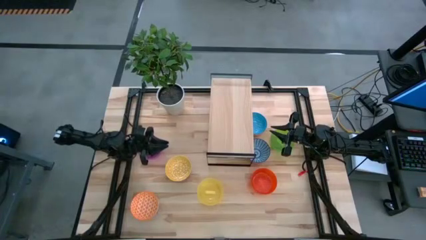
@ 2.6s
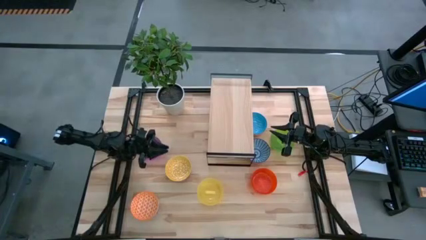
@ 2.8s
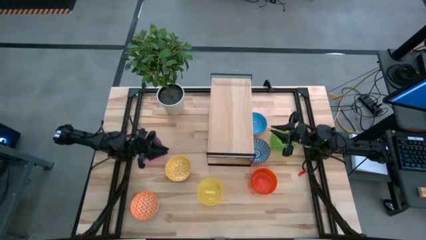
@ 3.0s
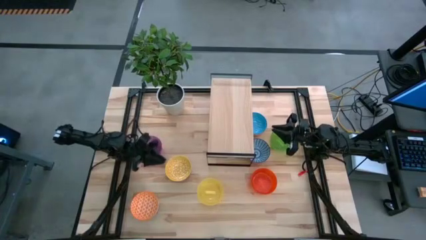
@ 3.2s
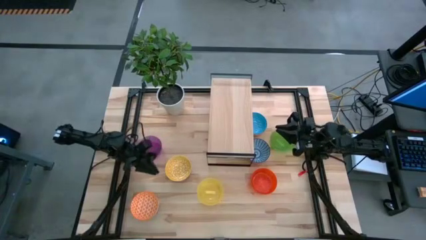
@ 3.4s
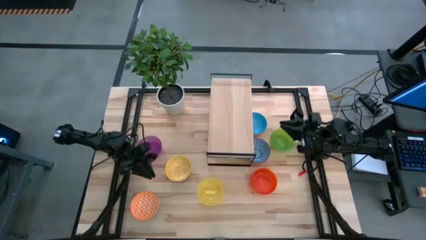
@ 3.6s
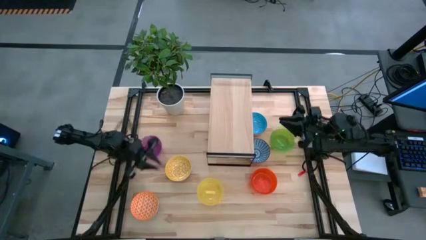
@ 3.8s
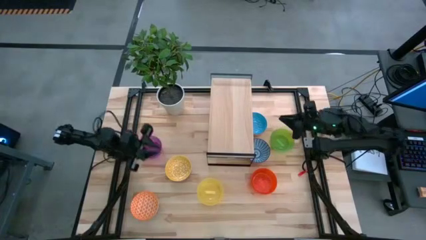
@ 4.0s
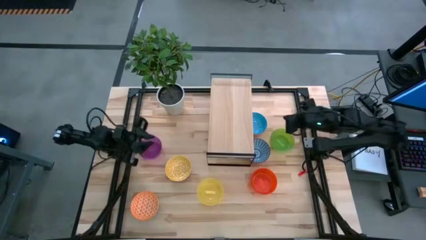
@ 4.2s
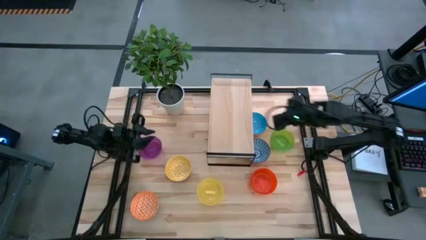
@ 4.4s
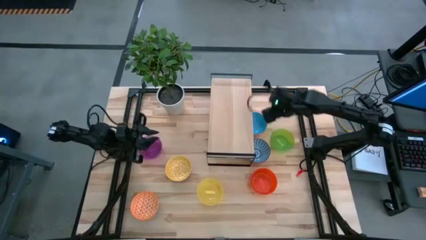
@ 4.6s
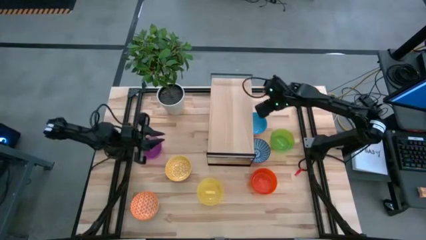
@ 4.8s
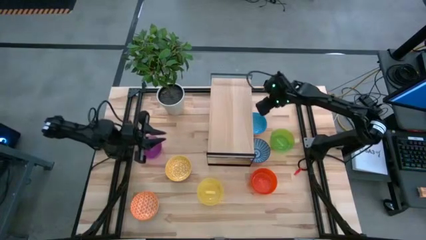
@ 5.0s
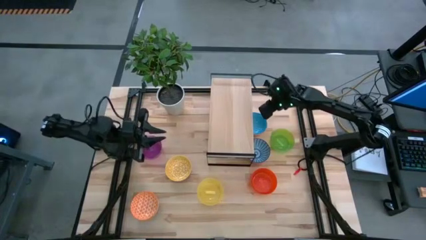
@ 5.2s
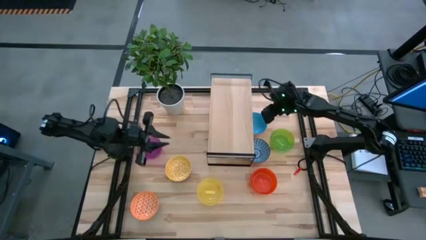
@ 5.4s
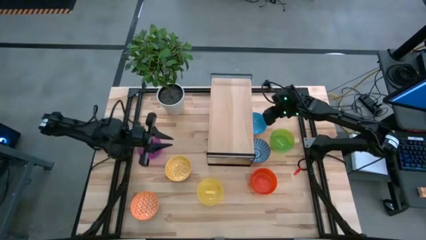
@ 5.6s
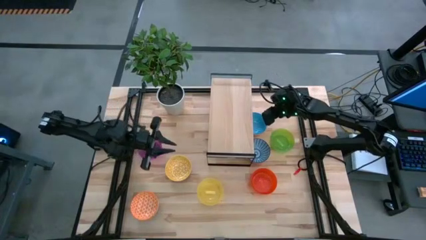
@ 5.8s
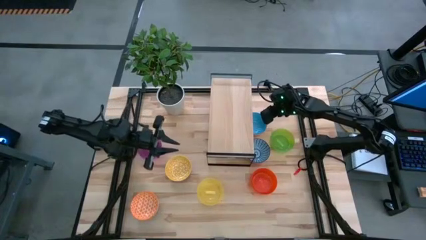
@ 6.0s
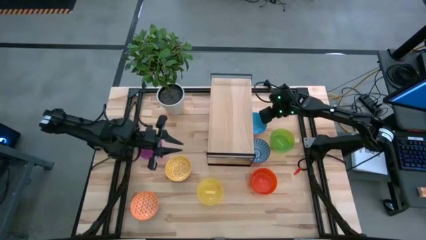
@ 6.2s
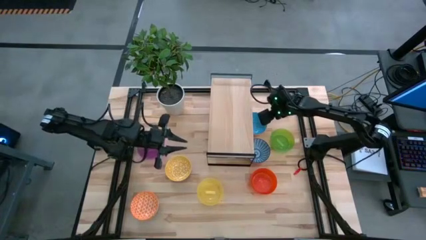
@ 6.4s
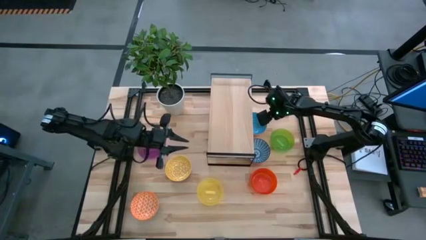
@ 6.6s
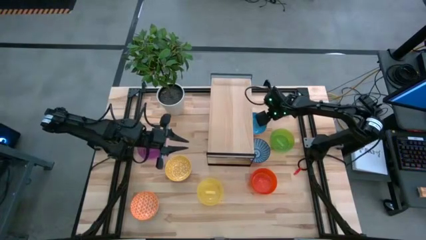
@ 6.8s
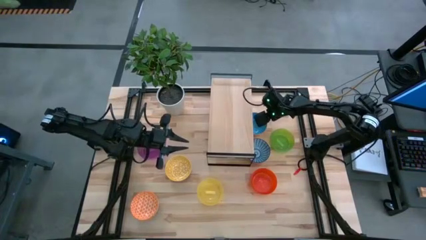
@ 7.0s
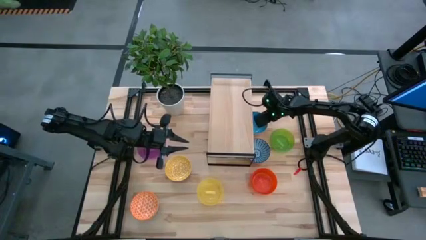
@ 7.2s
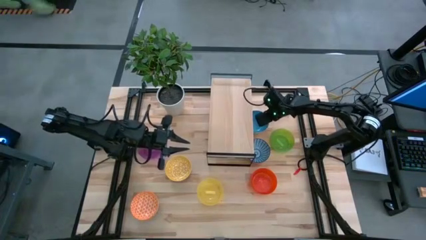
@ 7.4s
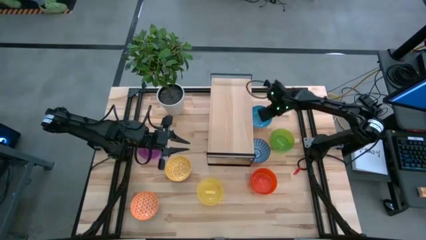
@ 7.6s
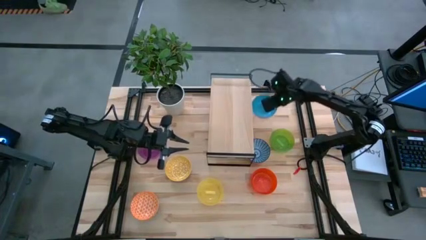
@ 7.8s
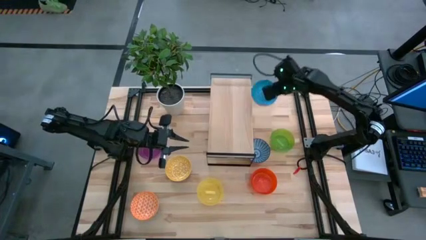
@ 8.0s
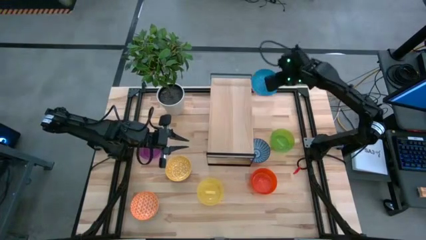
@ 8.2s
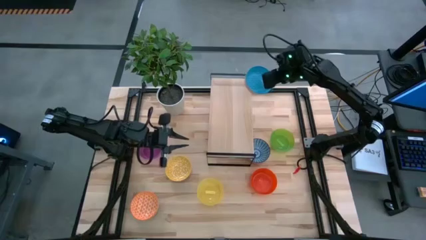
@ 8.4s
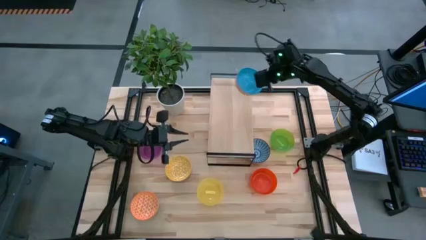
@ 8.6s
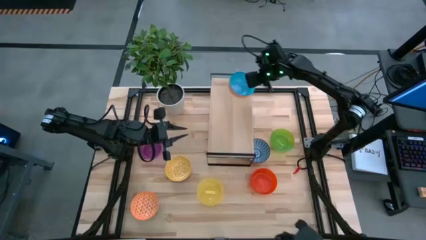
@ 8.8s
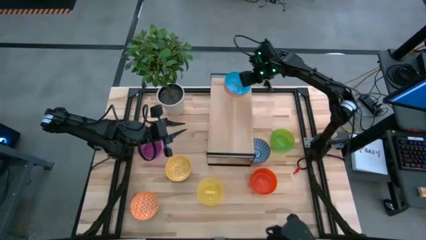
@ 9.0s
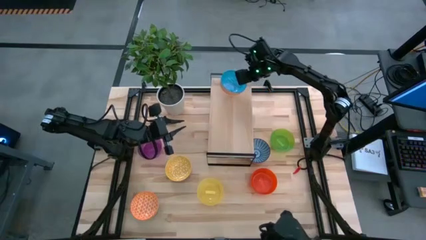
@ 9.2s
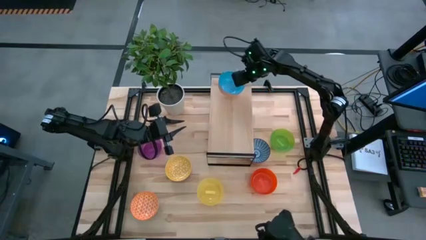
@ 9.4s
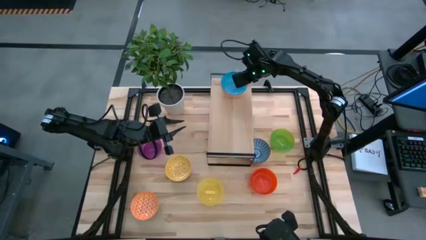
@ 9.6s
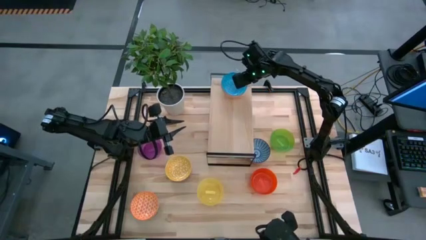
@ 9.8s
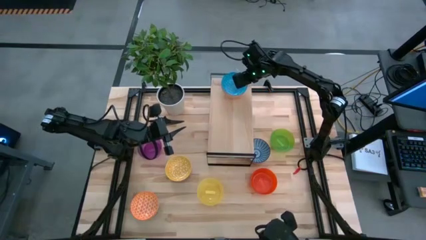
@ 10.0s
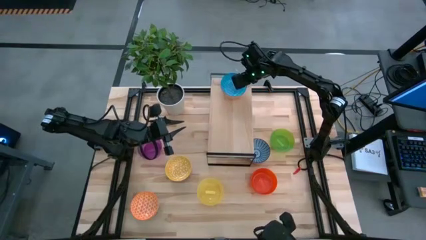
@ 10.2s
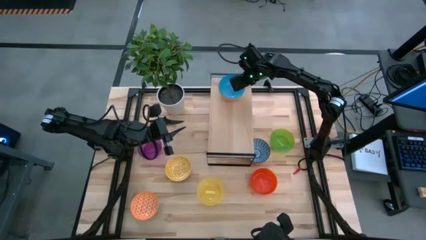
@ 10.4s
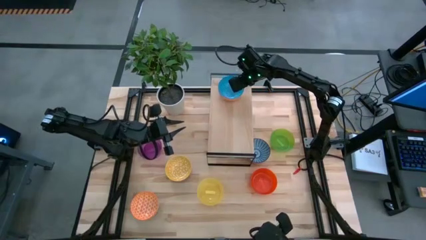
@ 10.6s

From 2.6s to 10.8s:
Task: Place and stack bowls onto a shelf
Put the blue patterned bowl on the shelf

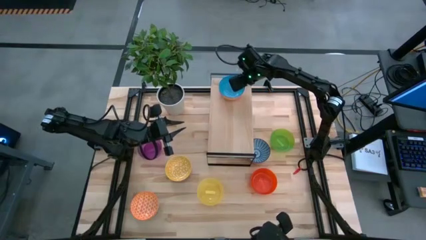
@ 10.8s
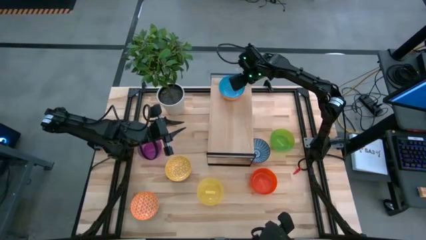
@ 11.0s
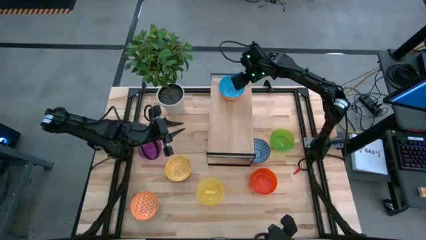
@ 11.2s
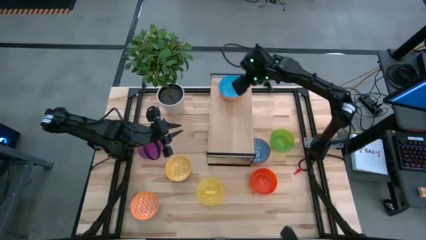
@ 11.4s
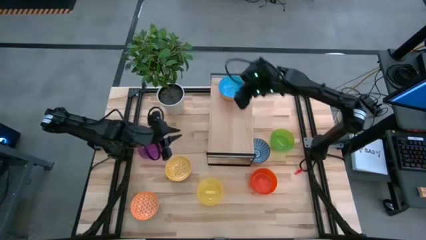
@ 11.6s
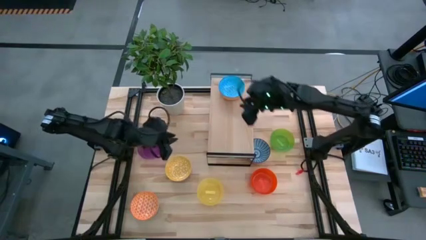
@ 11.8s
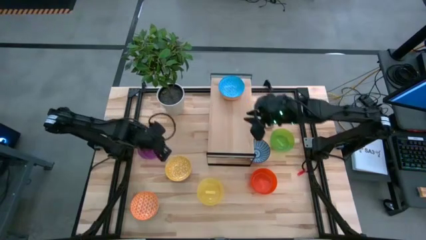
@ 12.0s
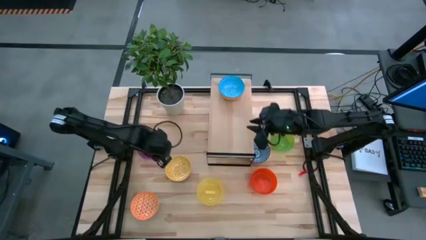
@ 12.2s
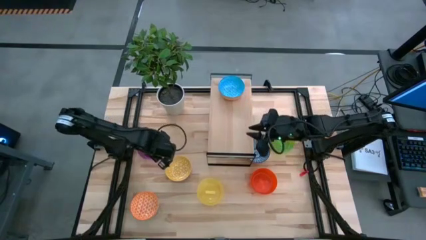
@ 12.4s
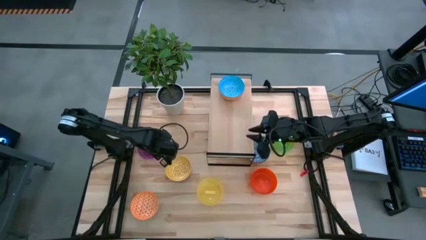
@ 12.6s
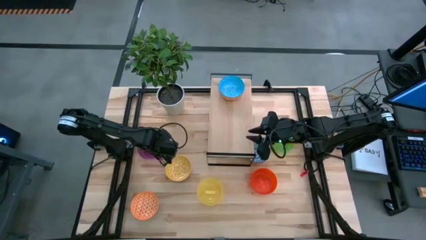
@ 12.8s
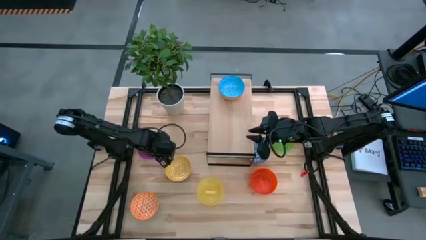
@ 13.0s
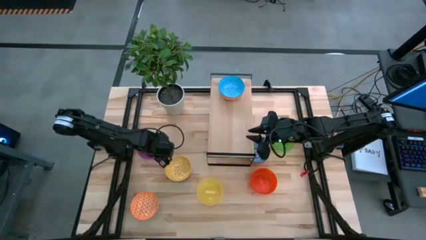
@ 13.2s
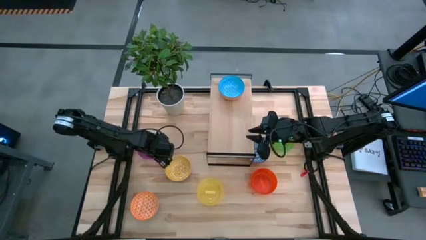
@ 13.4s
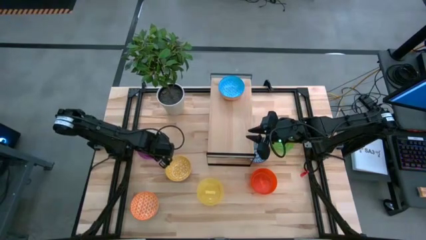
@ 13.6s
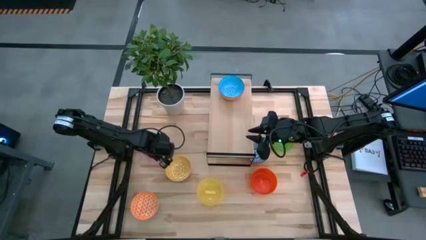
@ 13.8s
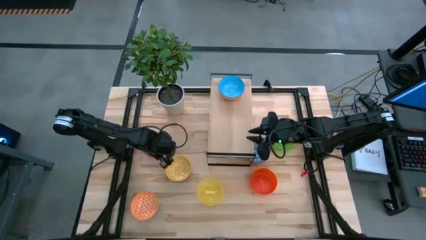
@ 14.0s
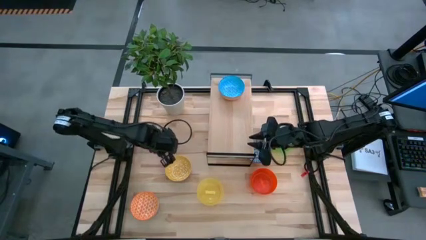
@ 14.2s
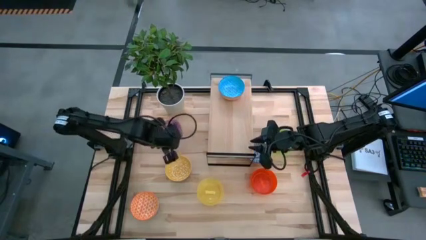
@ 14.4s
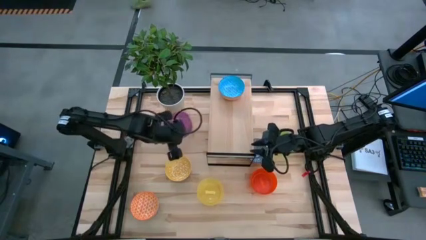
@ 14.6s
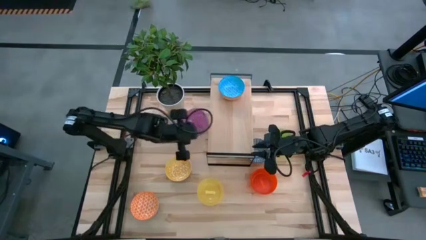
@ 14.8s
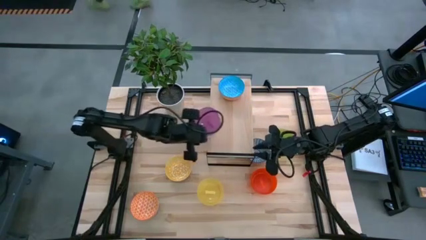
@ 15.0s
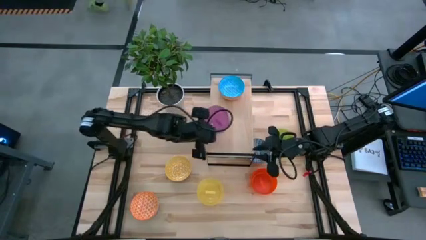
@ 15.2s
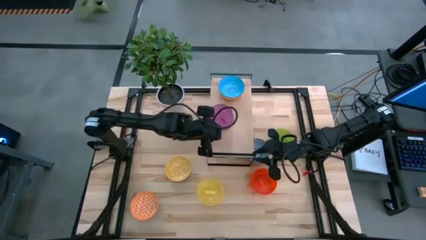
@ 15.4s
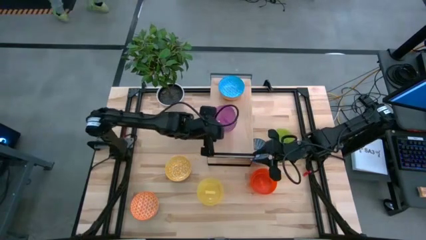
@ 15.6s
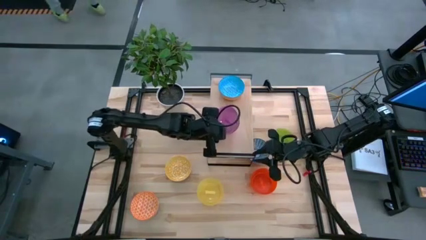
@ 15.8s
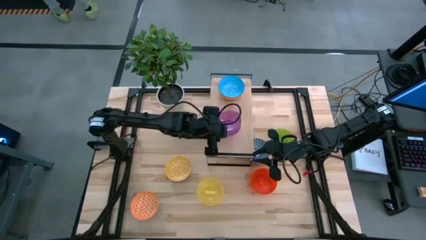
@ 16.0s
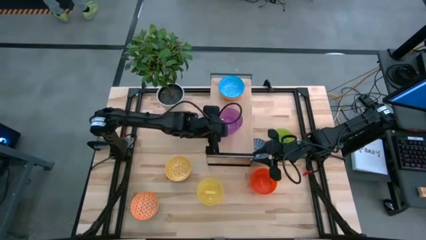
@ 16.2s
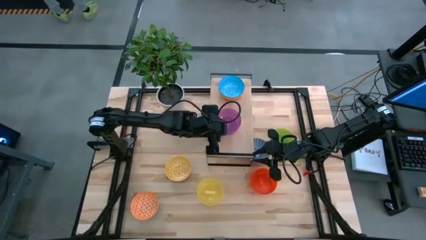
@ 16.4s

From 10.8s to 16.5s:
Put the purple bowl on the shelf
